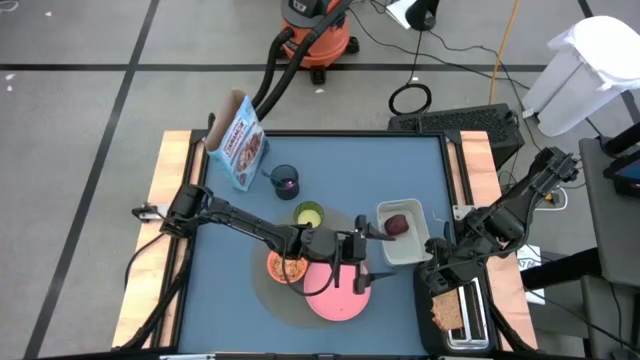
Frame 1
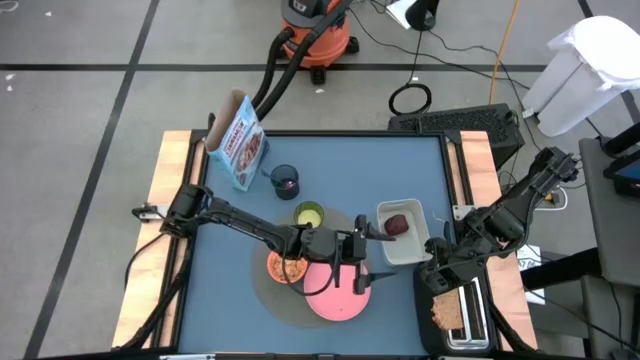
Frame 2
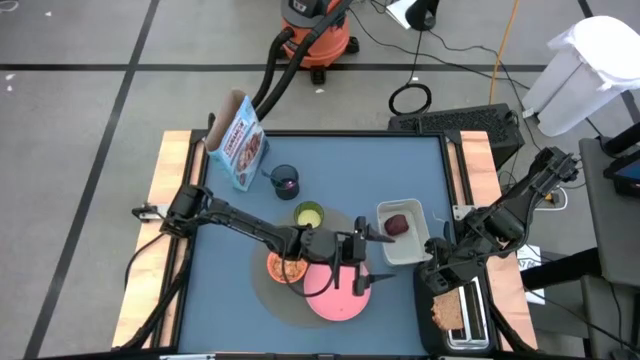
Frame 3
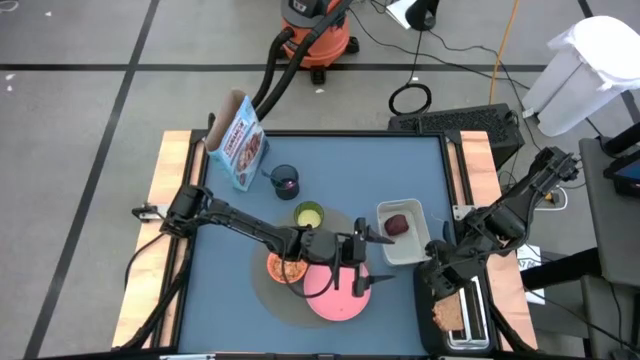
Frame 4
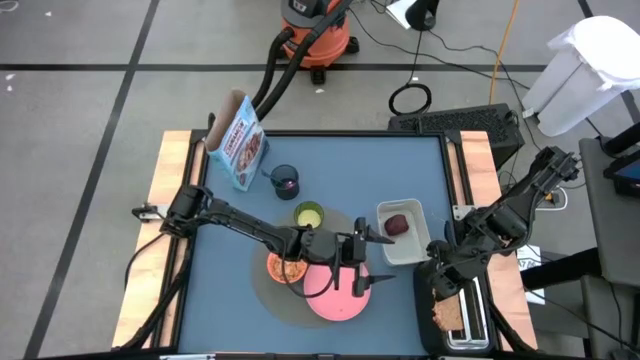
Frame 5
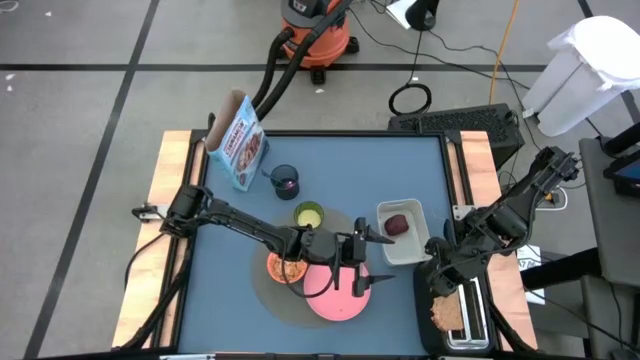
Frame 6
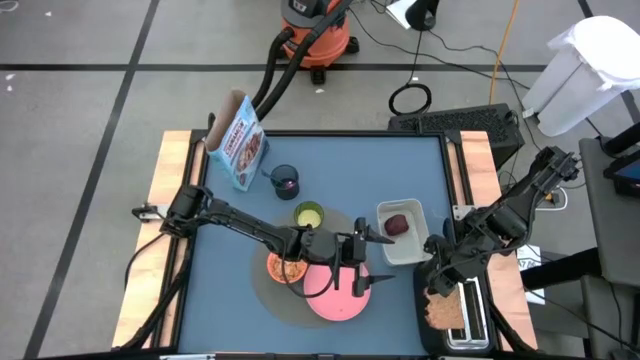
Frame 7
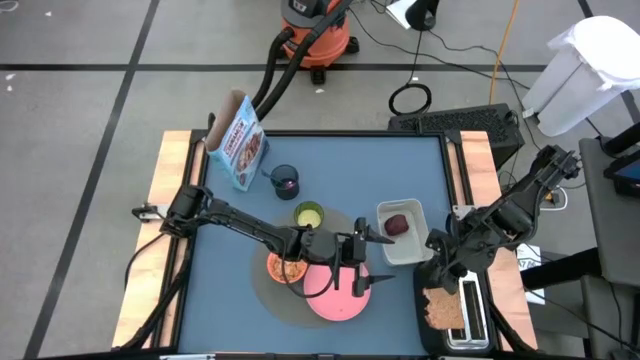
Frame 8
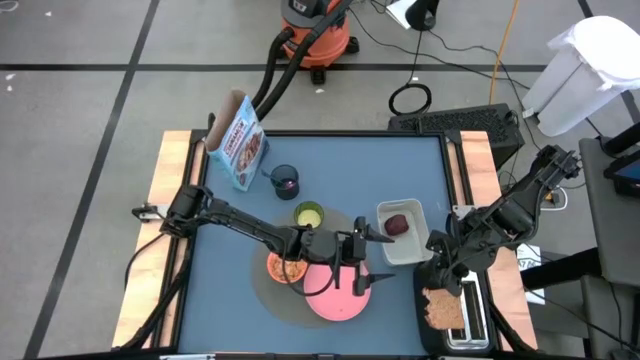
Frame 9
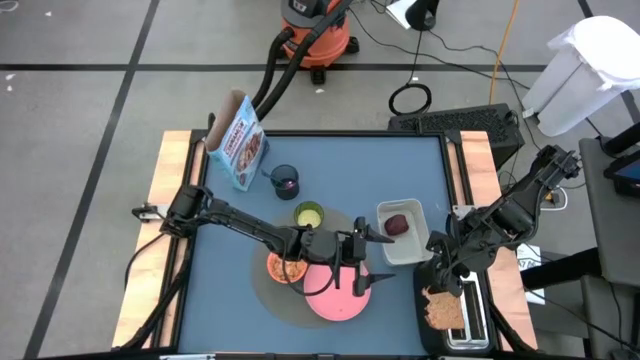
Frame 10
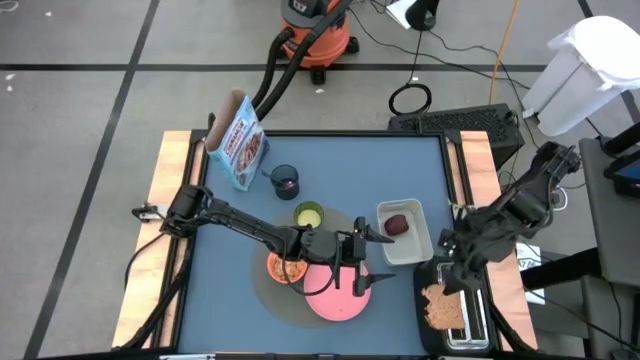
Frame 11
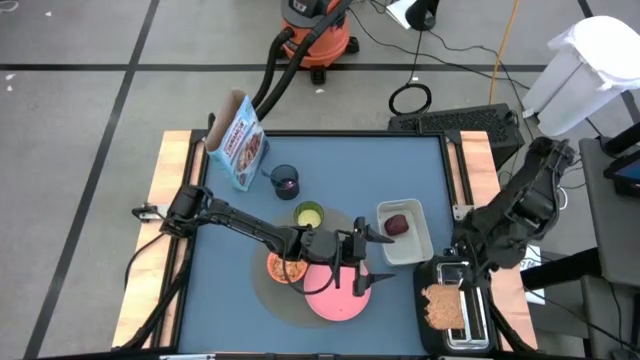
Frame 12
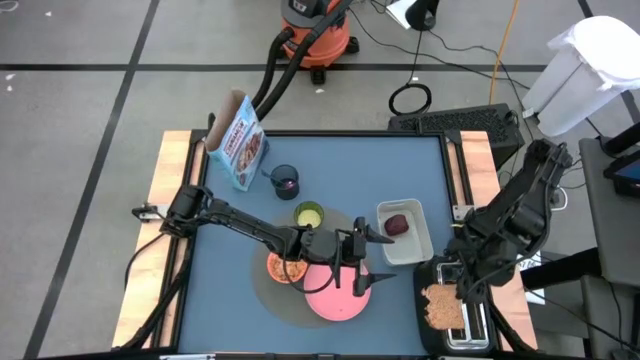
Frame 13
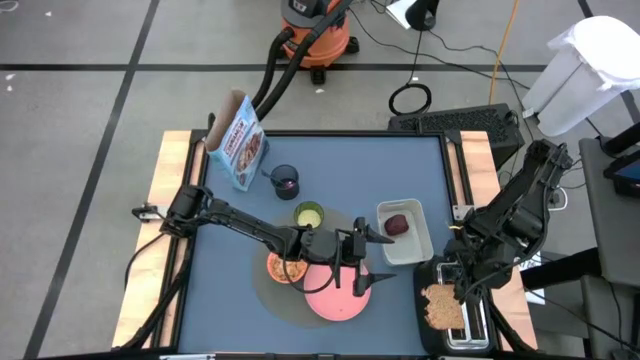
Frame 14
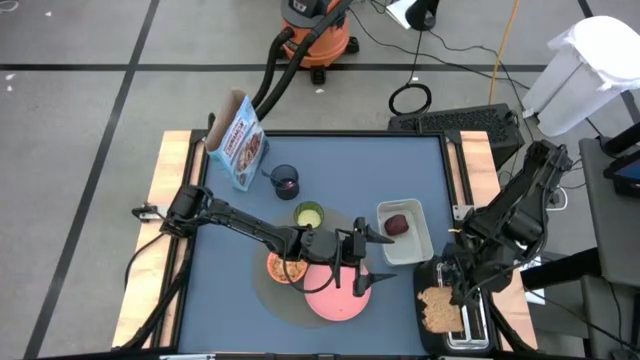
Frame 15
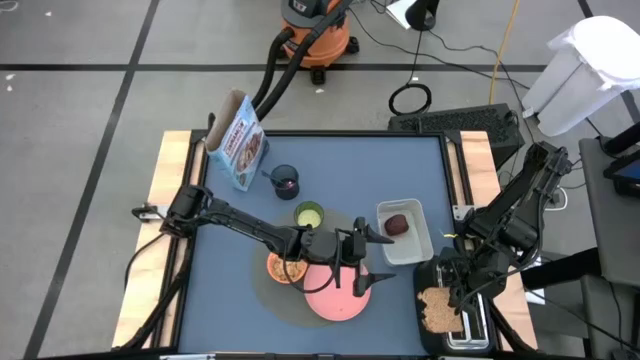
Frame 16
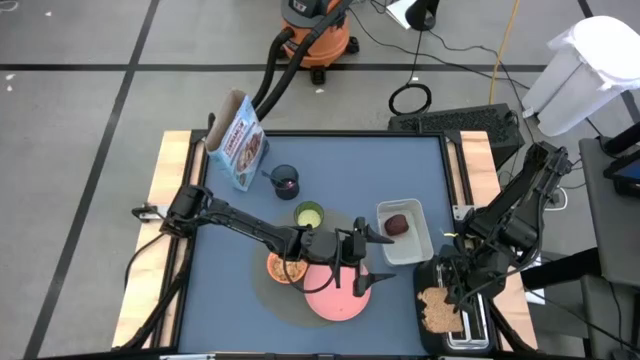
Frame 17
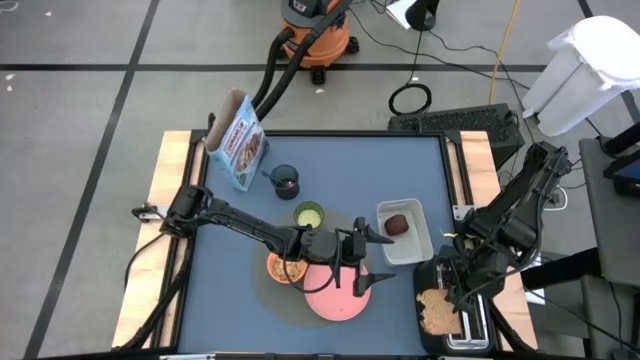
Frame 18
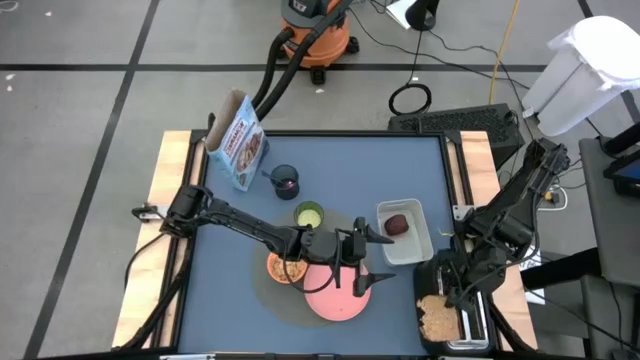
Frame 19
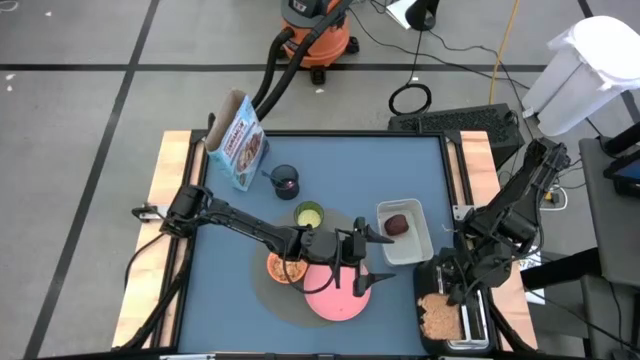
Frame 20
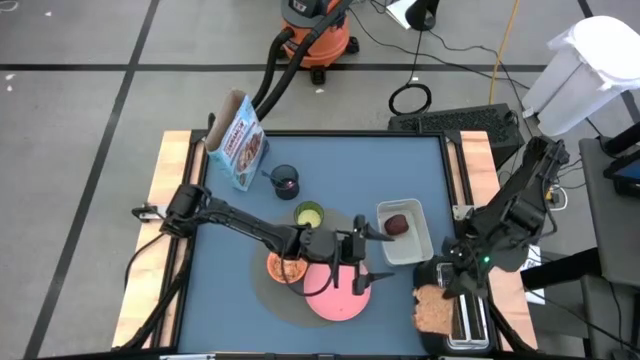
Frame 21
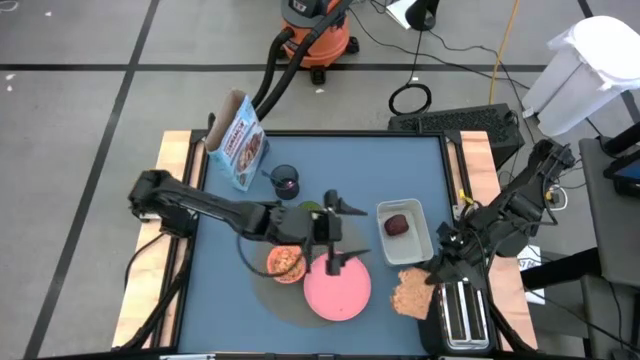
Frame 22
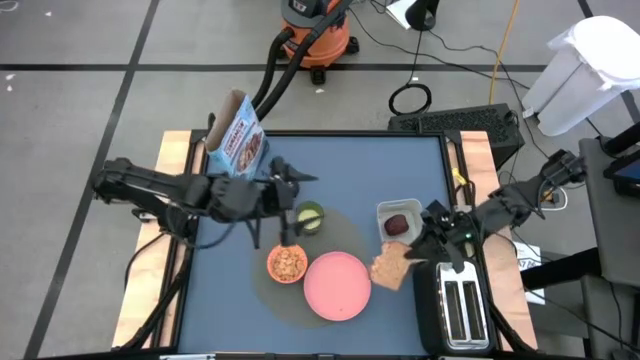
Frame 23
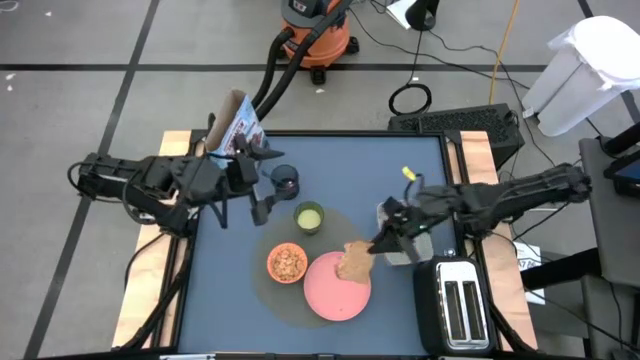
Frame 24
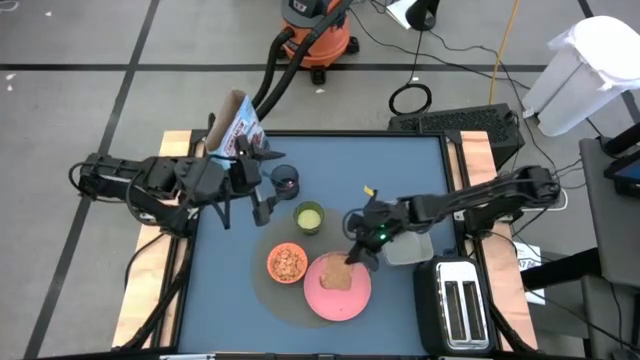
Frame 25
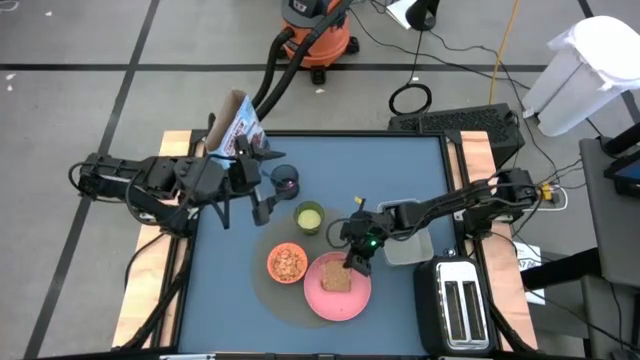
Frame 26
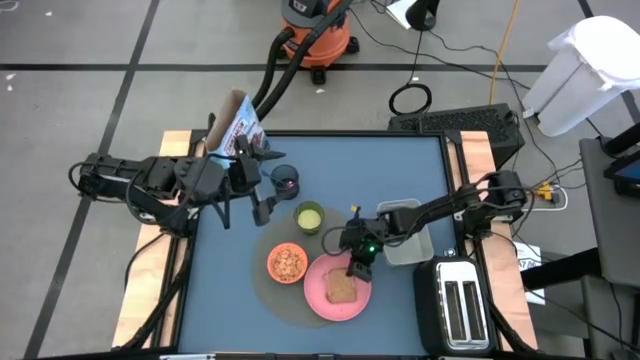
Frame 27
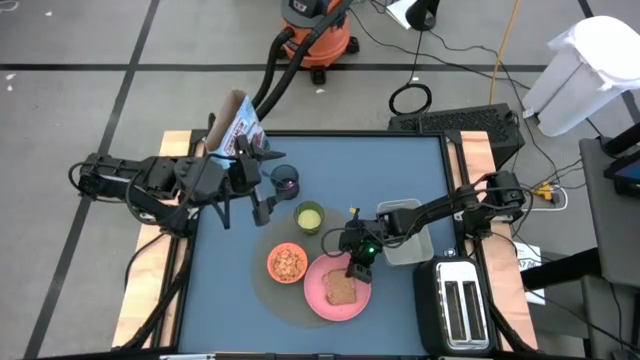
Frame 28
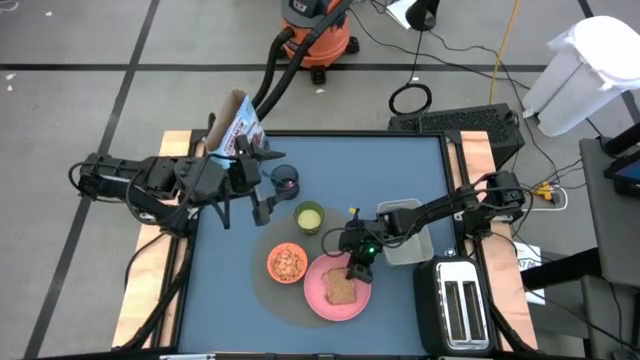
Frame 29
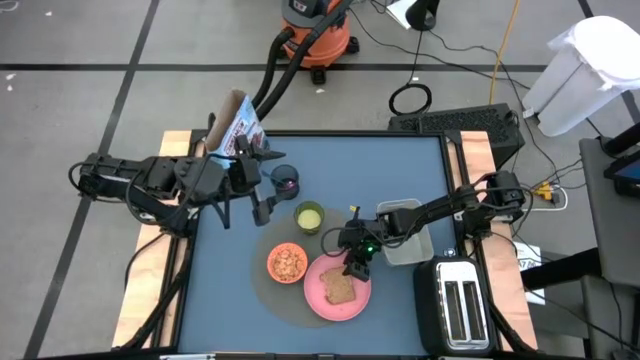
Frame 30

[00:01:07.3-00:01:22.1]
Task: Arrange a breakfast setting
Put the toasted bread on the pink plate

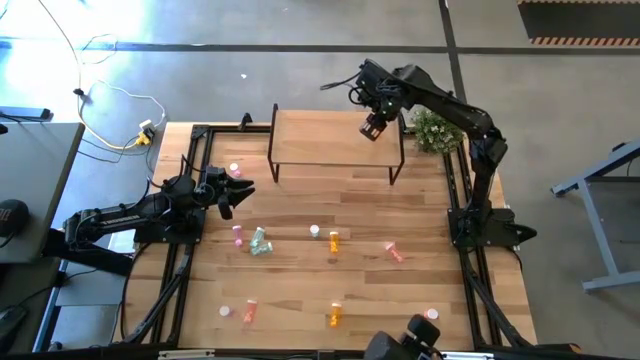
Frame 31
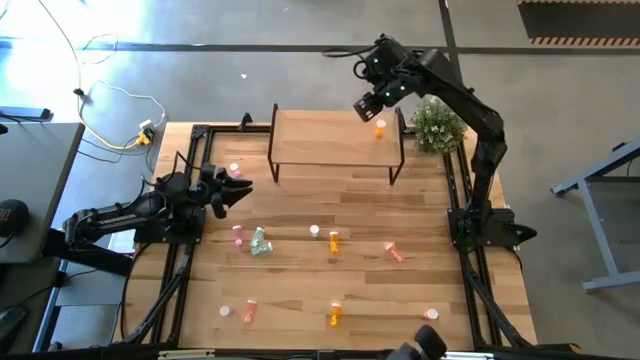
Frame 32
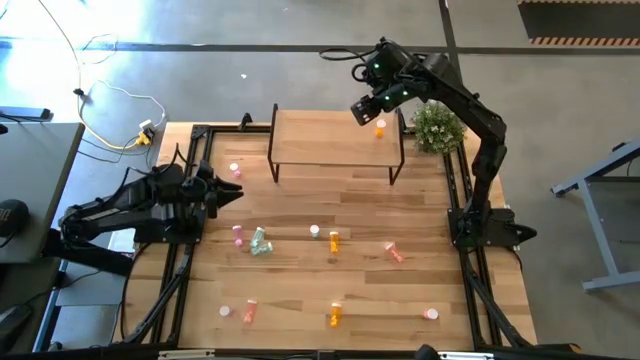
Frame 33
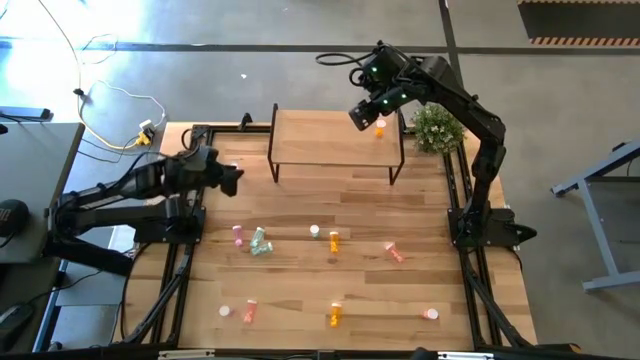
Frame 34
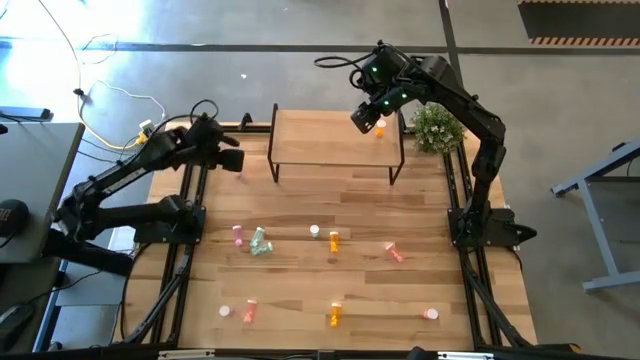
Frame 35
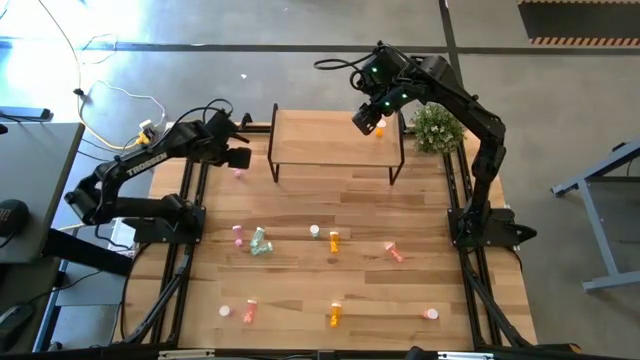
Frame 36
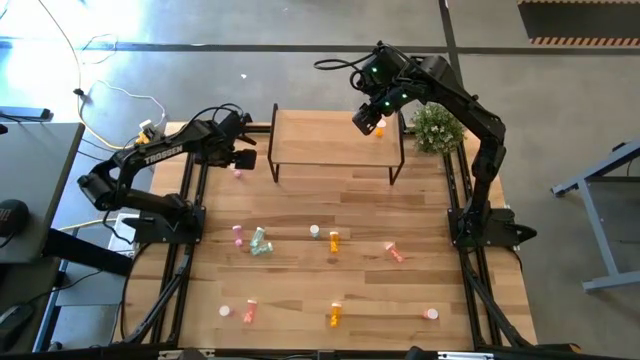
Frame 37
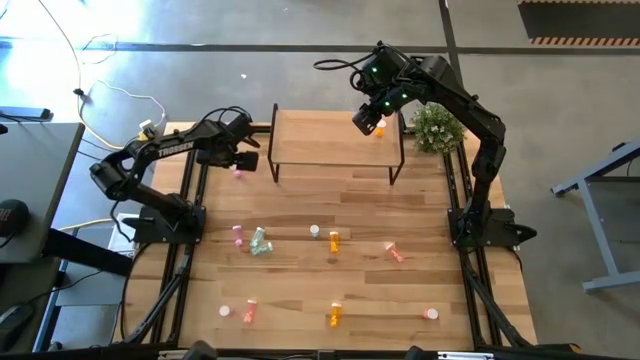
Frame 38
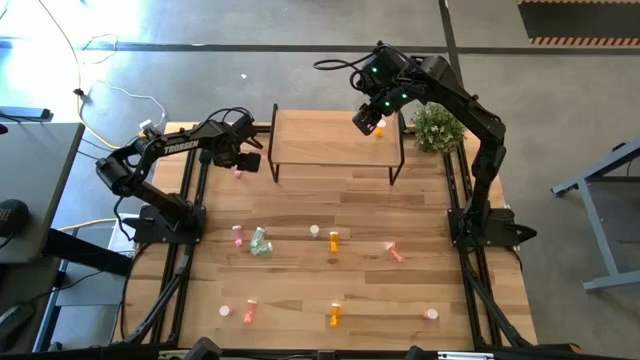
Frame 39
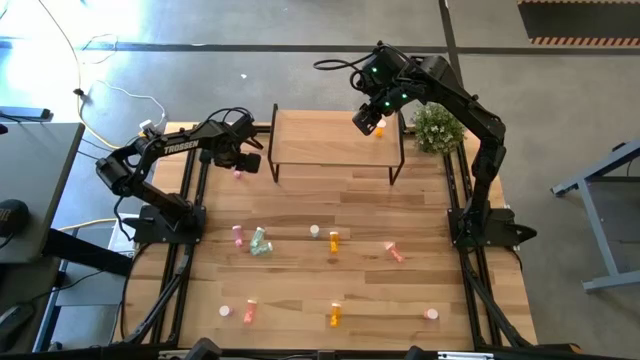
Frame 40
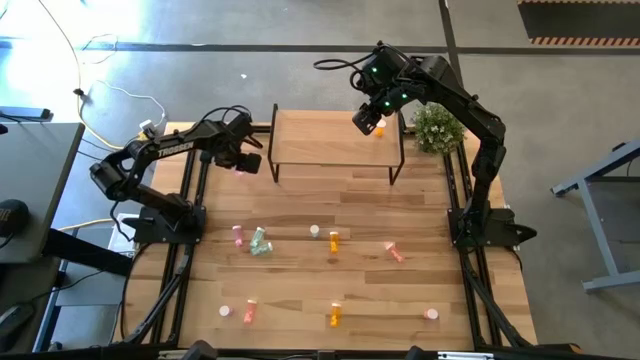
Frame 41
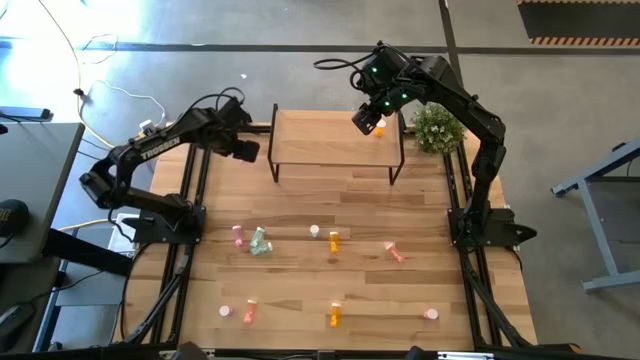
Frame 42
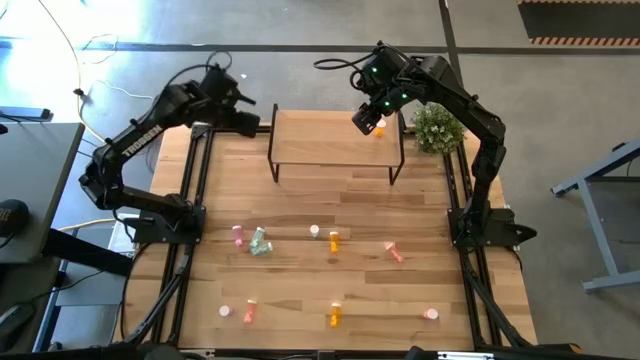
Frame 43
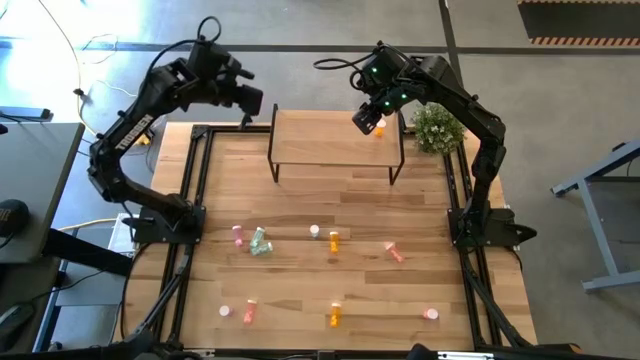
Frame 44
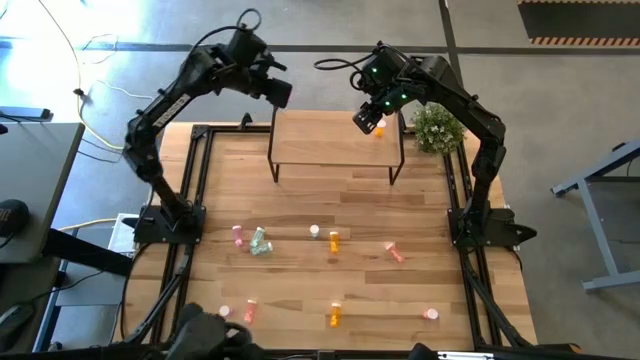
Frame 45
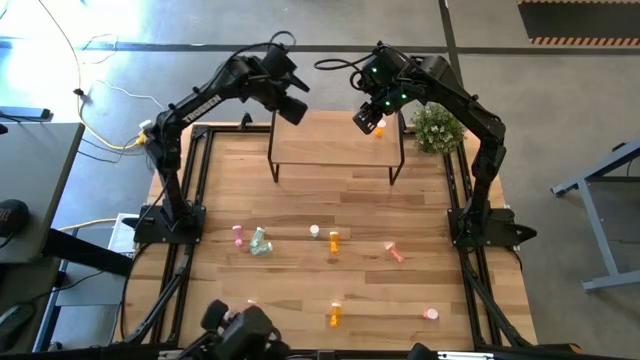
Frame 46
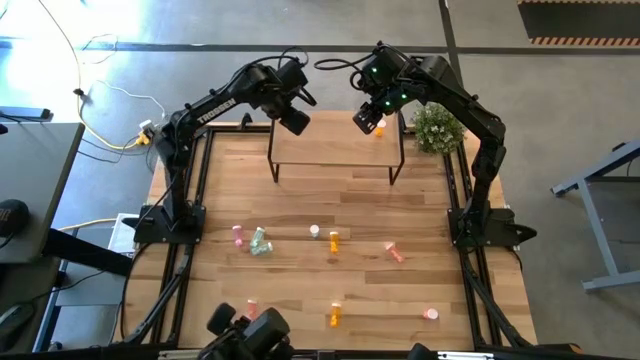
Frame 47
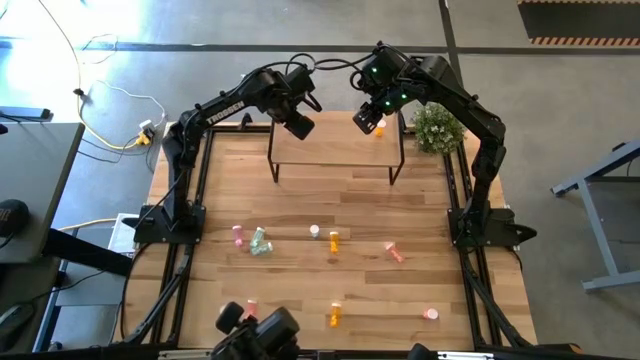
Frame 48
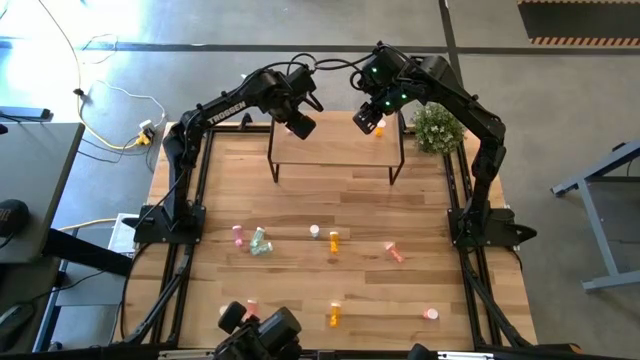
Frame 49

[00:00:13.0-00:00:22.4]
Task: Pick and place medicine bottles onto shelf by color
Put the top violet pill bottle on the shelf
